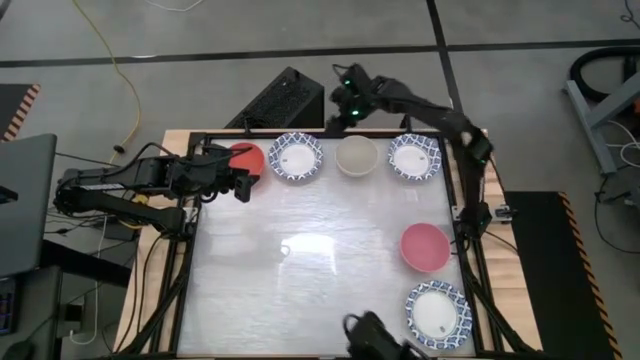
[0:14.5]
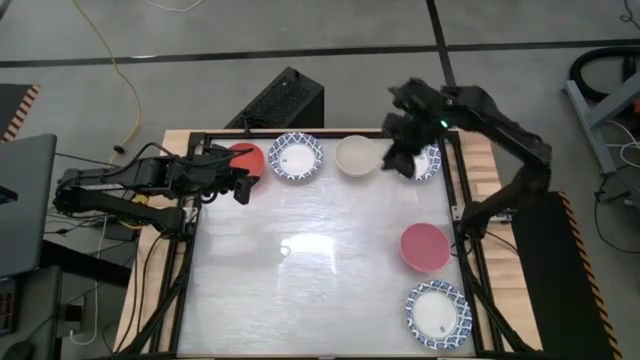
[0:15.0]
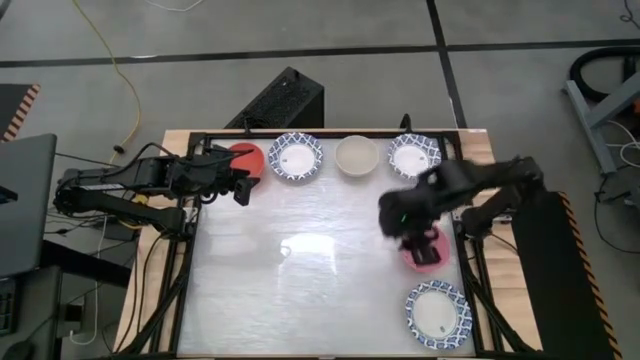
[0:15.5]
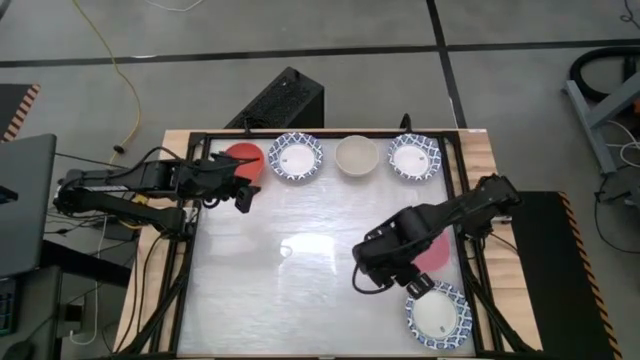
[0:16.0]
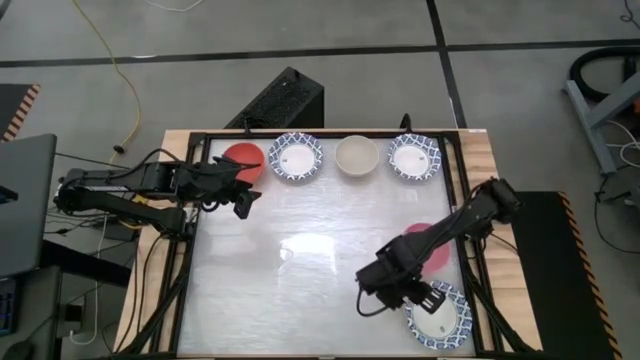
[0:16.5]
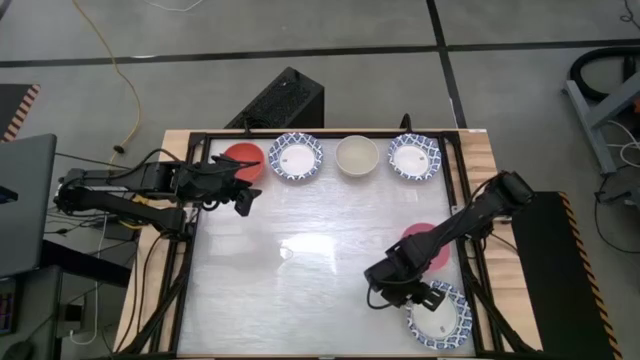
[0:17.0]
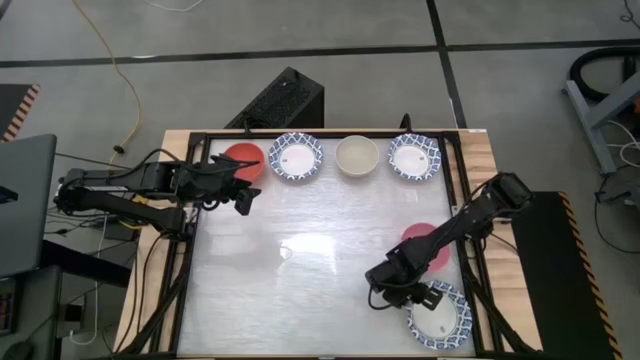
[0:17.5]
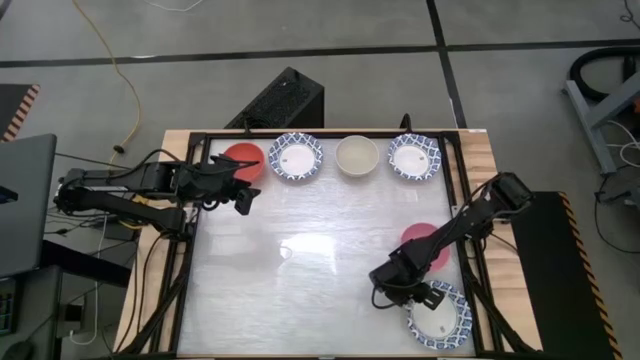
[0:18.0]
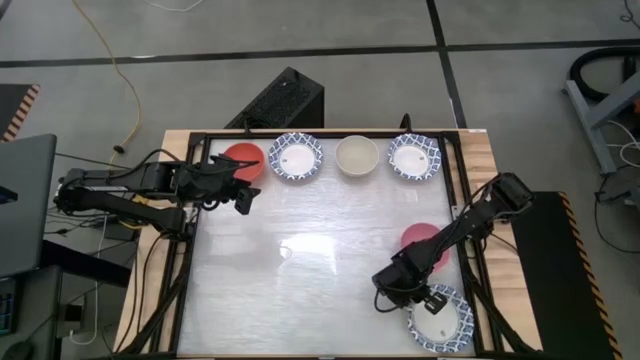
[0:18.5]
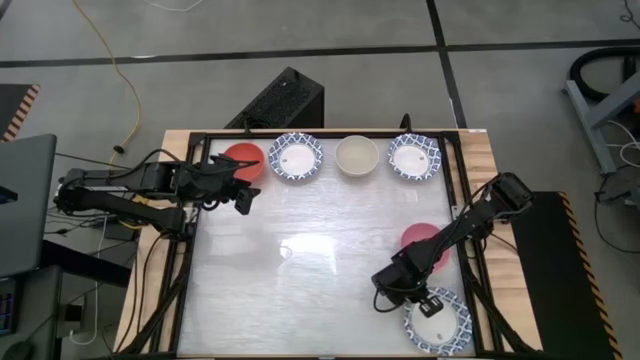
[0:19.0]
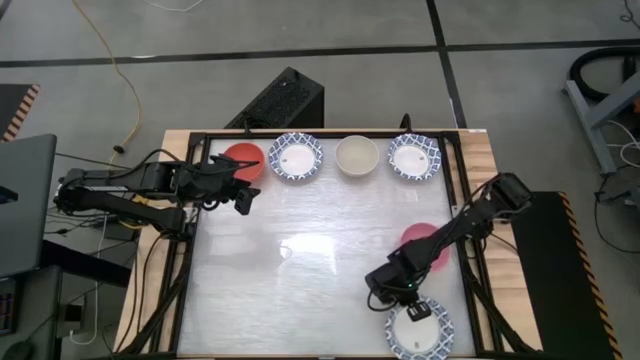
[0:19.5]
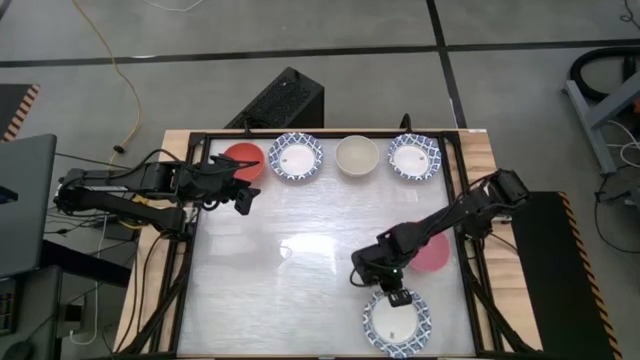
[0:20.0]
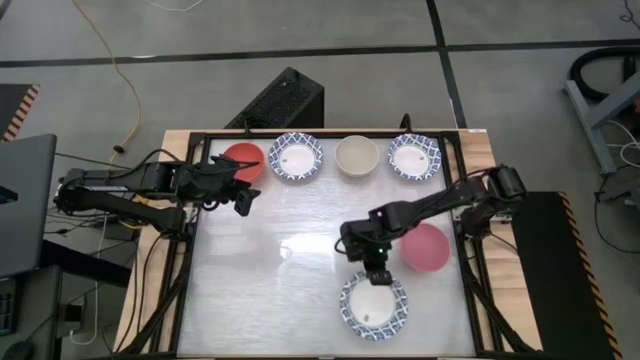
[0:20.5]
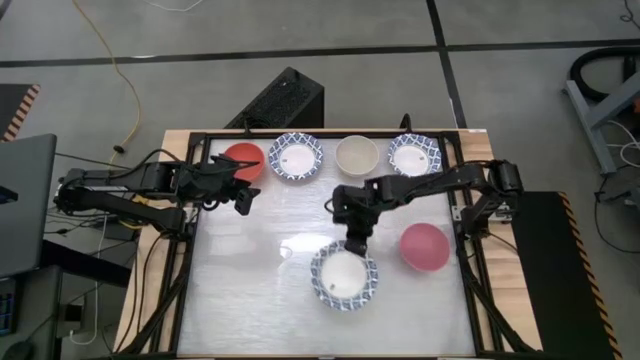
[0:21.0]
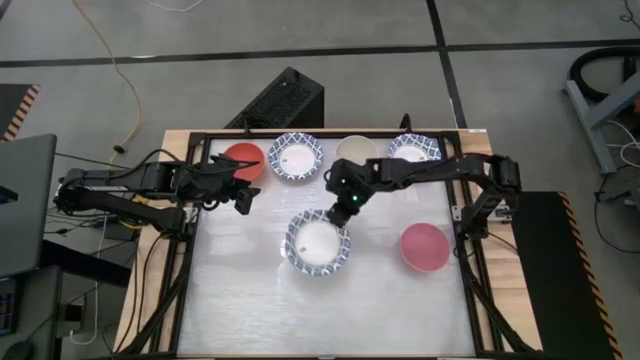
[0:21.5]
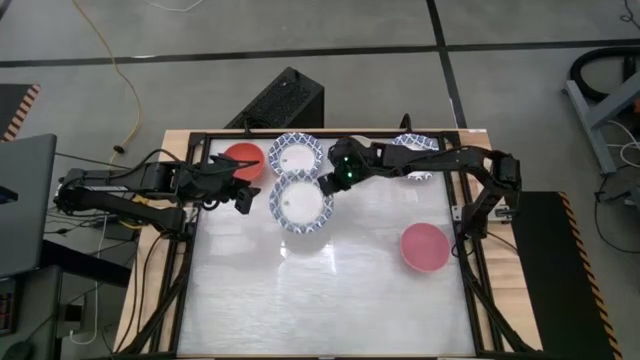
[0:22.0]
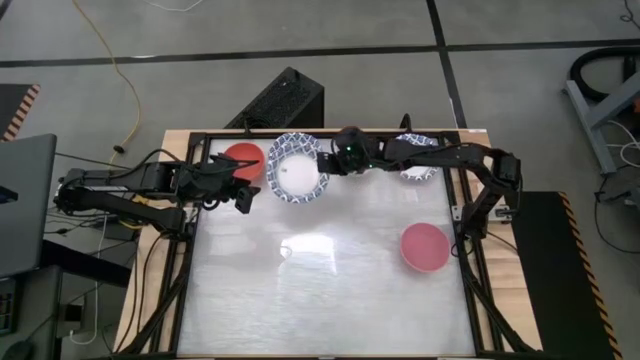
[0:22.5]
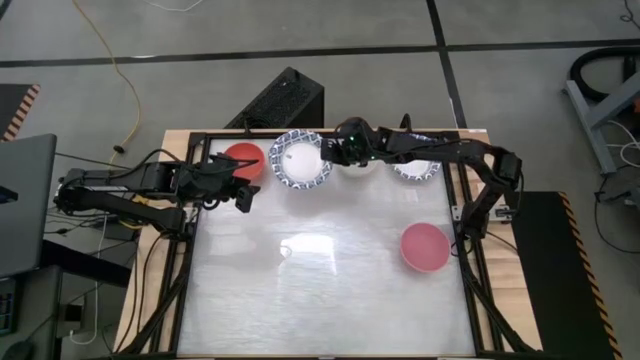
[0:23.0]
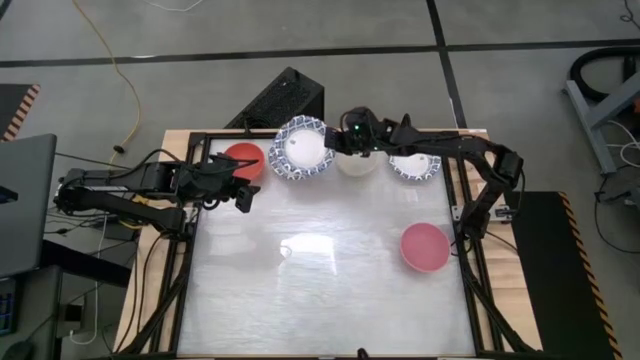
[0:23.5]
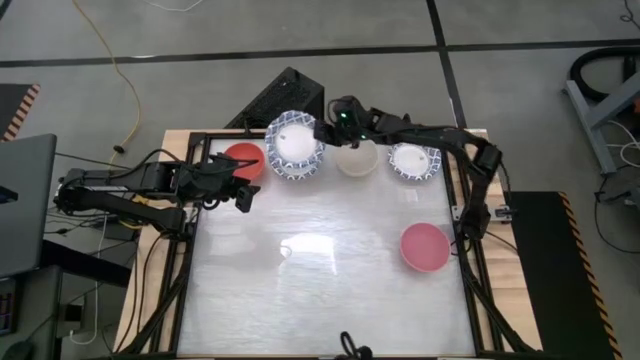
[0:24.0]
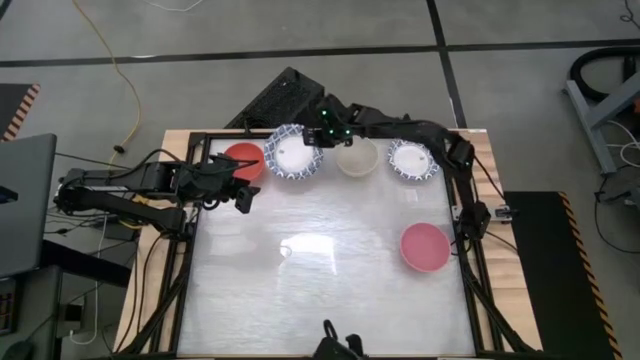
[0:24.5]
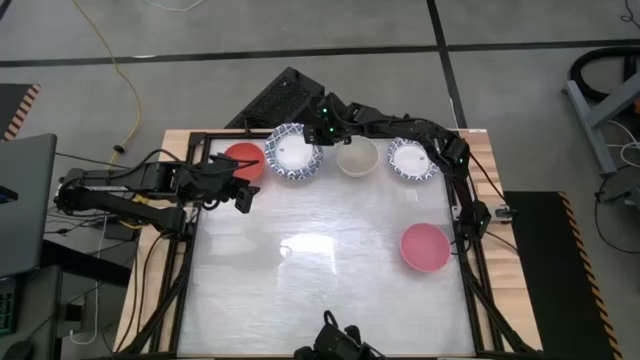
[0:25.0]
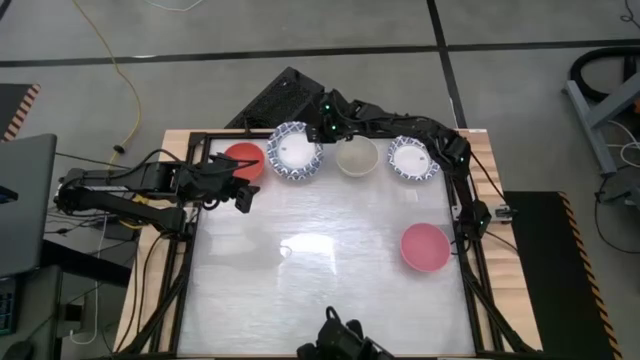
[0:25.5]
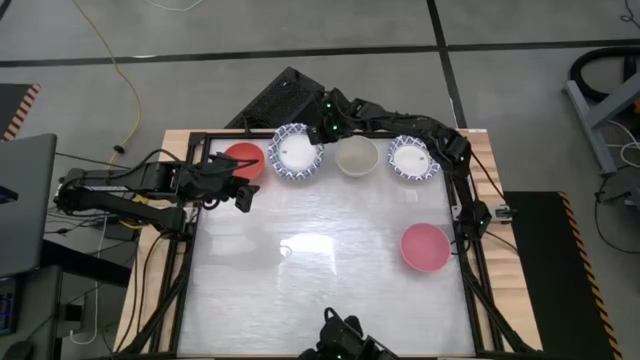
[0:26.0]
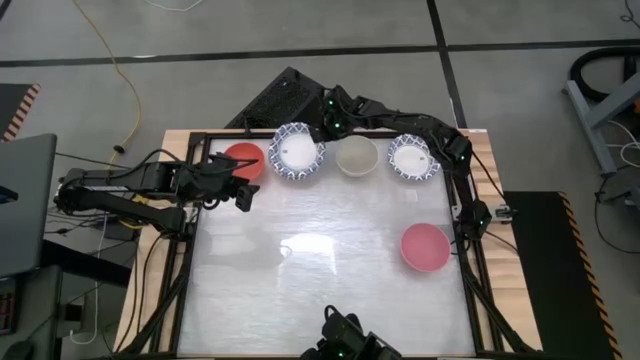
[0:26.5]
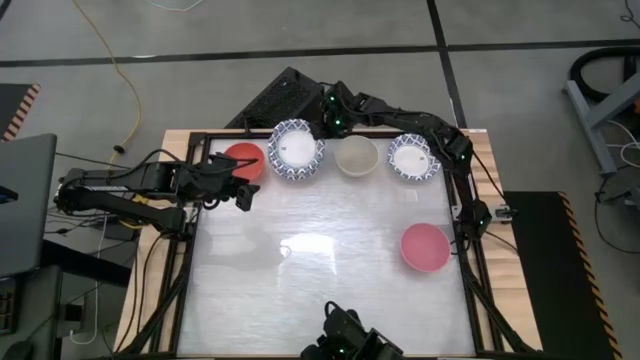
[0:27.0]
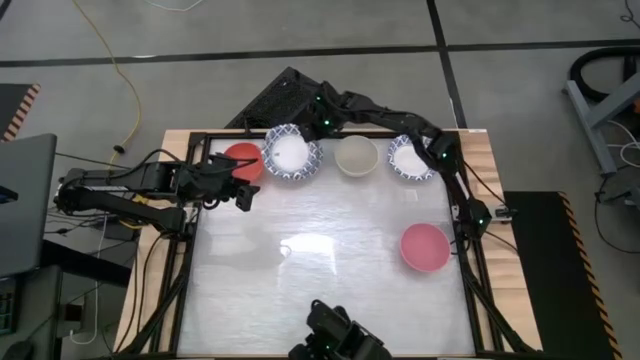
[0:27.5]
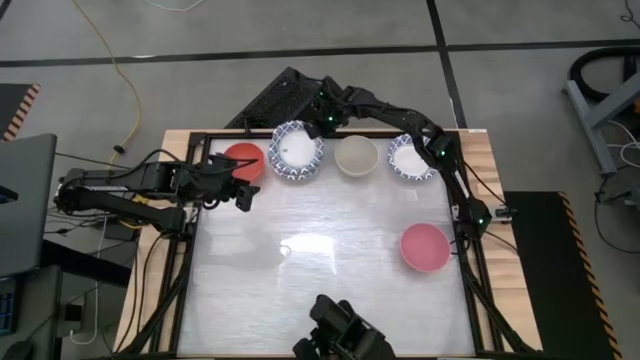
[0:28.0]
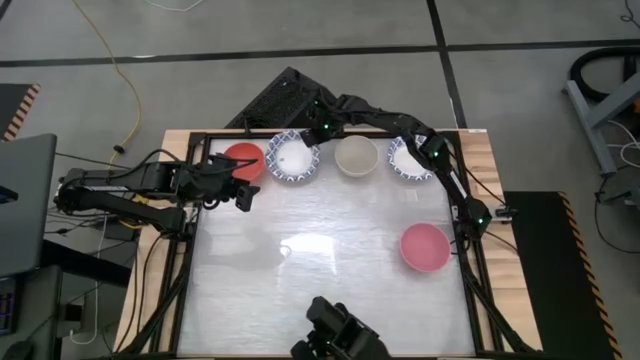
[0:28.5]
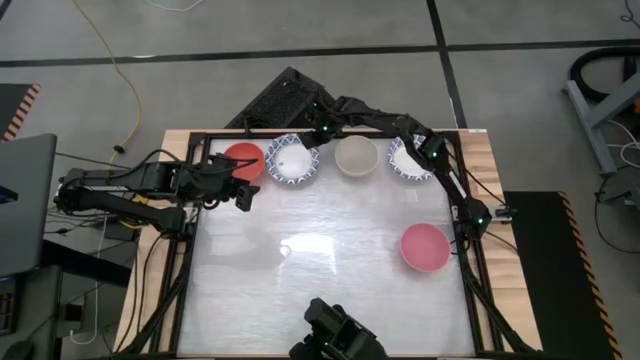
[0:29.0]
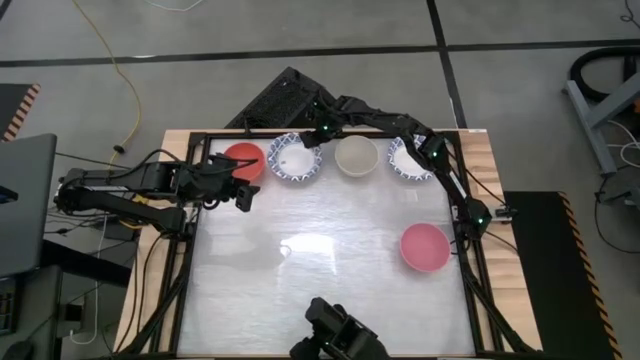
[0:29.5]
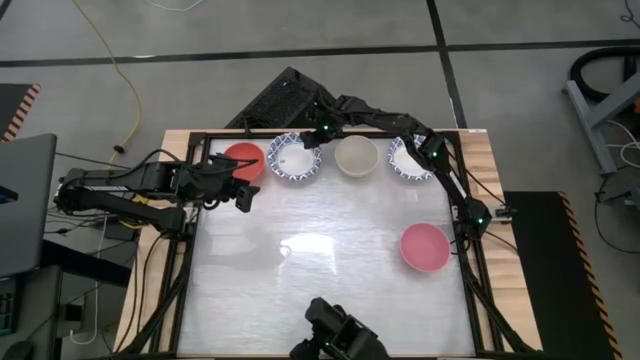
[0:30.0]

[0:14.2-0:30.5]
Stack the bottom blue patterned bowl on top of the blue patterned bowl

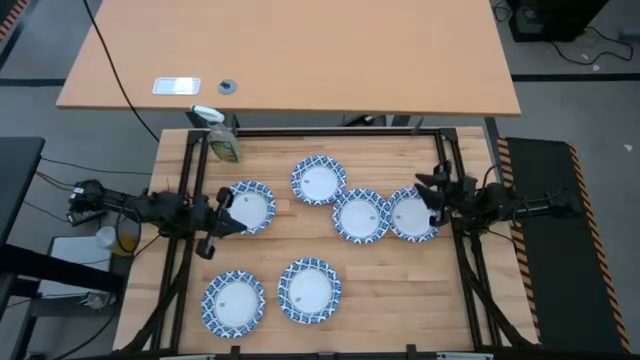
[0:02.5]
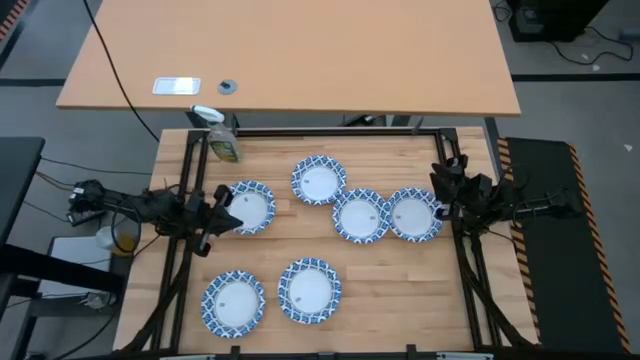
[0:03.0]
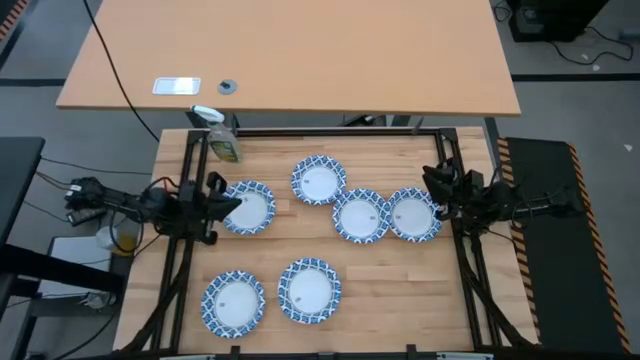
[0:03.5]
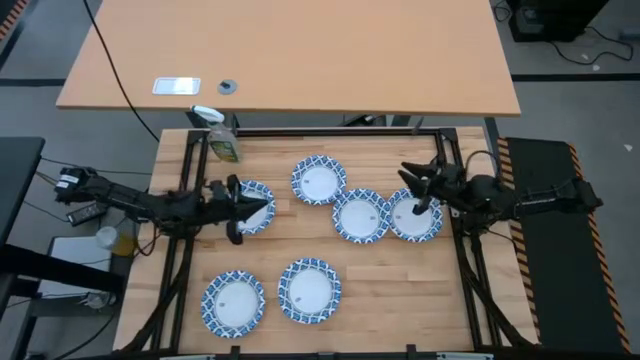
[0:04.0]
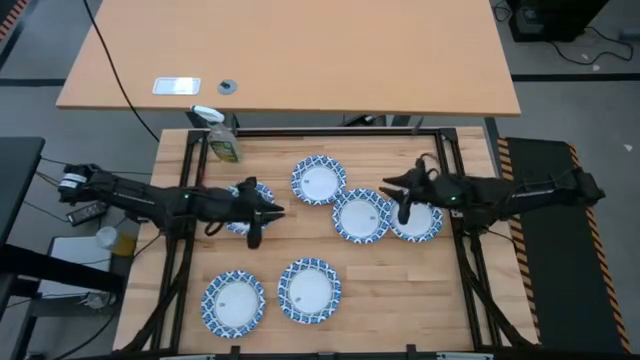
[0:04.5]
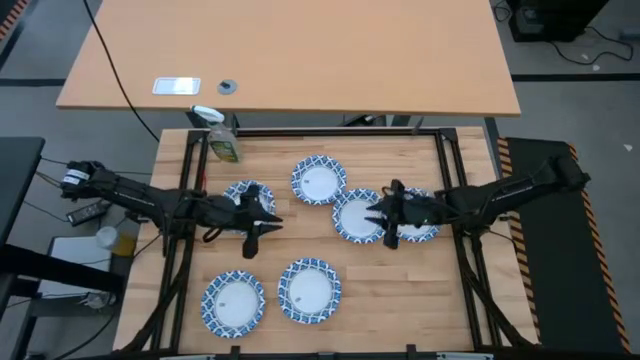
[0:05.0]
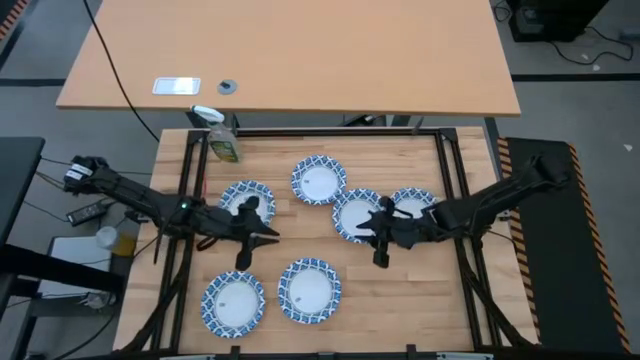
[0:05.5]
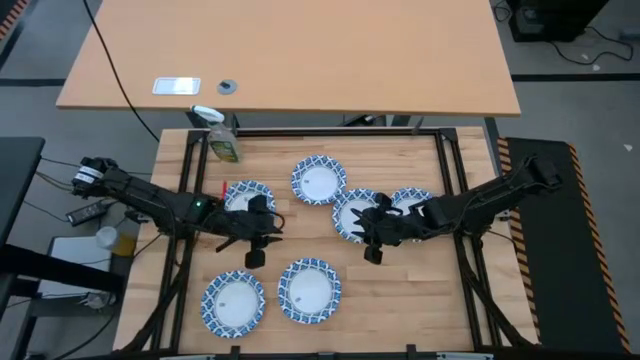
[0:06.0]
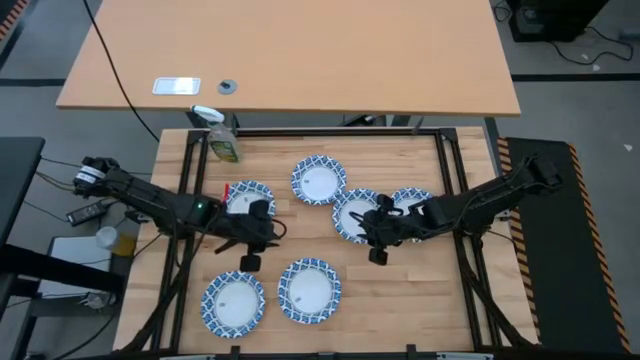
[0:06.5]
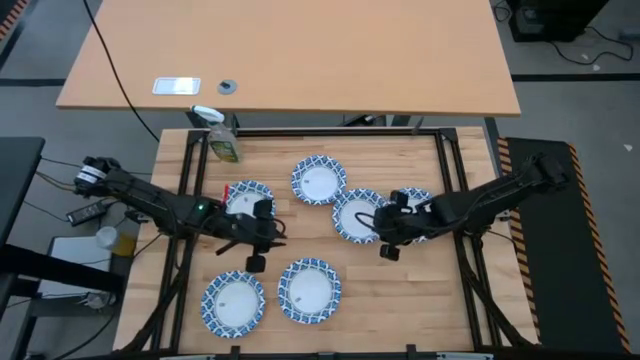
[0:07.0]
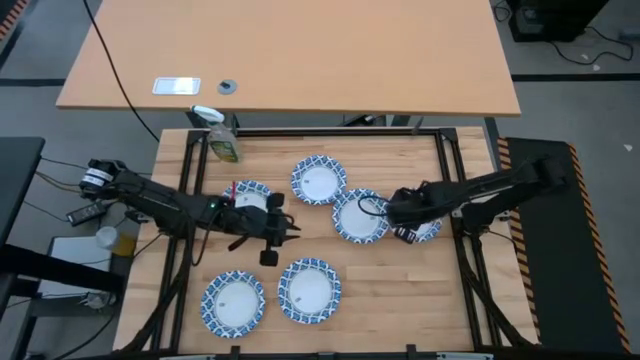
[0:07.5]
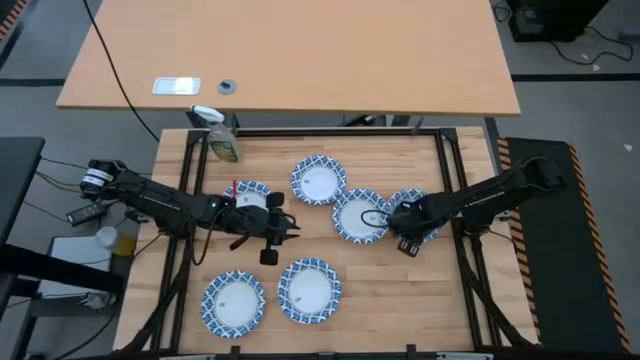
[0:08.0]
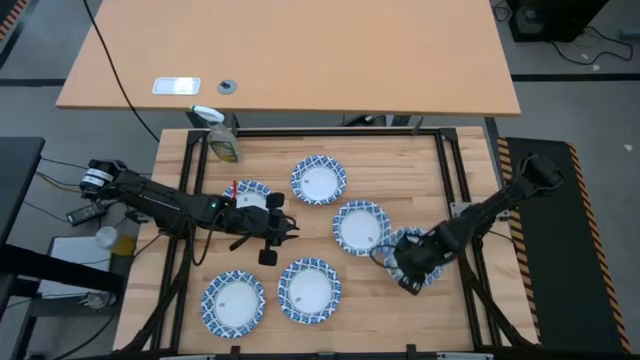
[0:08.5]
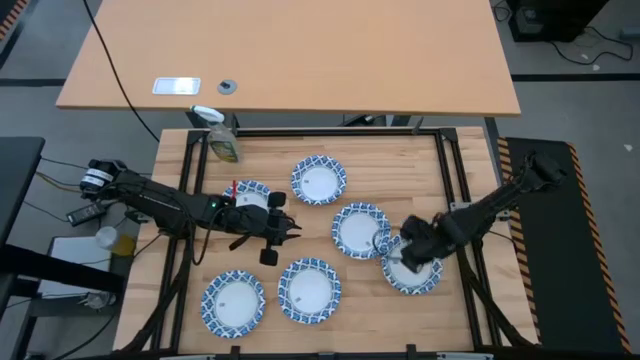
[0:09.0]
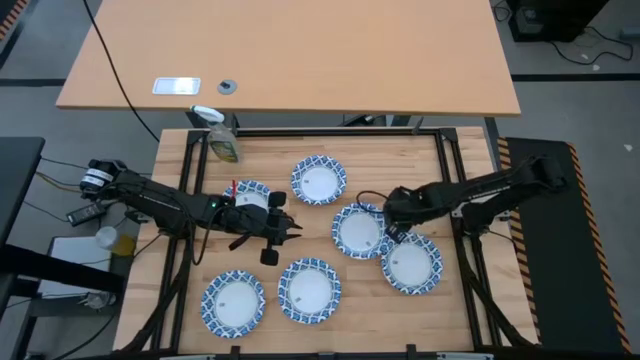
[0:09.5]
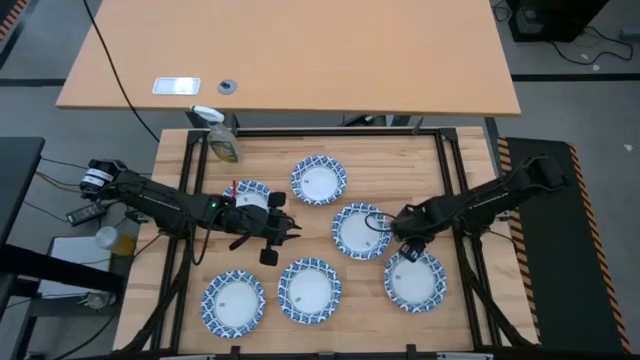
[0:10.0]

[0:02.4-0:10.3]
Move the white bowl to the bottom
